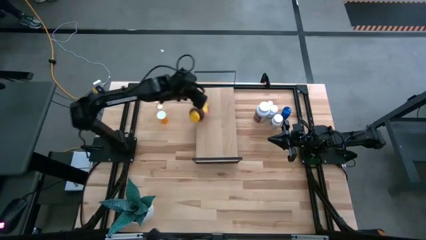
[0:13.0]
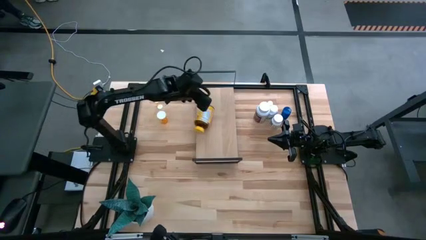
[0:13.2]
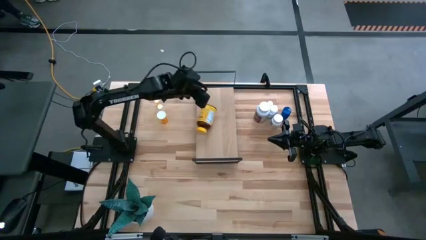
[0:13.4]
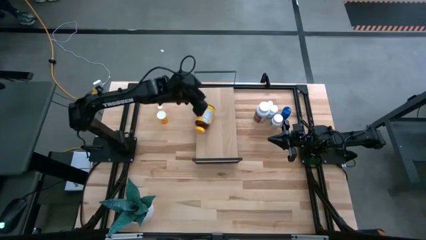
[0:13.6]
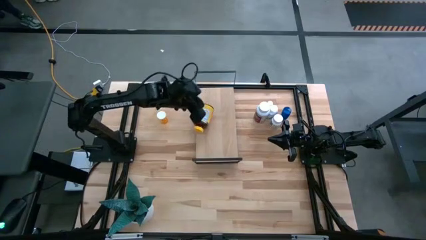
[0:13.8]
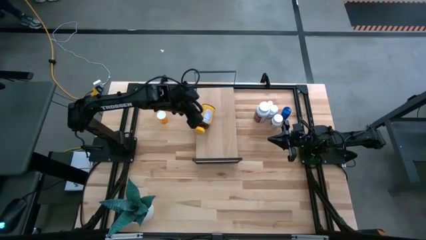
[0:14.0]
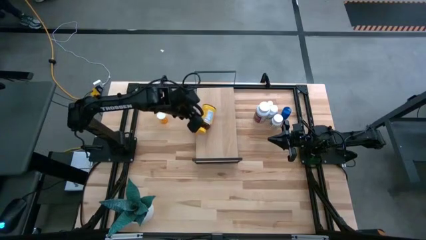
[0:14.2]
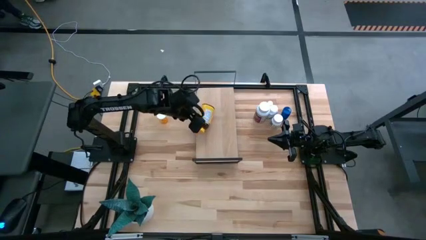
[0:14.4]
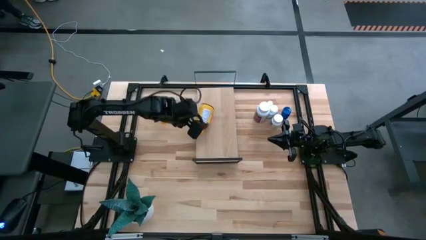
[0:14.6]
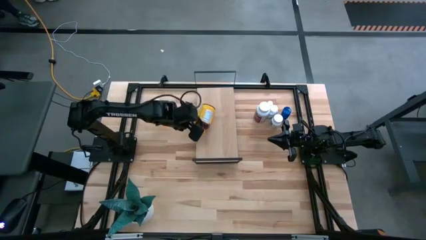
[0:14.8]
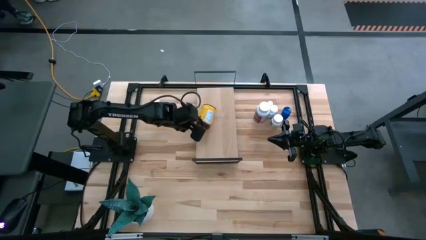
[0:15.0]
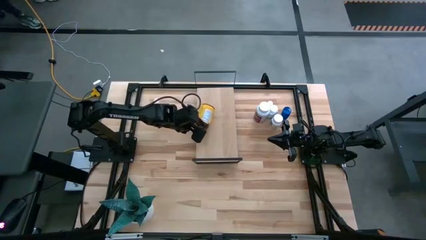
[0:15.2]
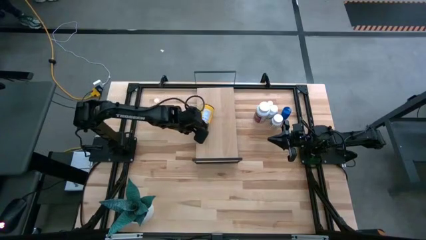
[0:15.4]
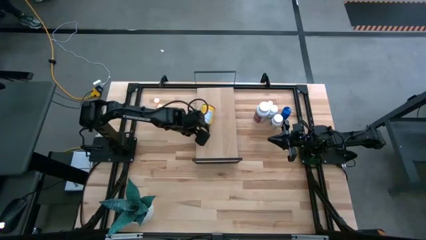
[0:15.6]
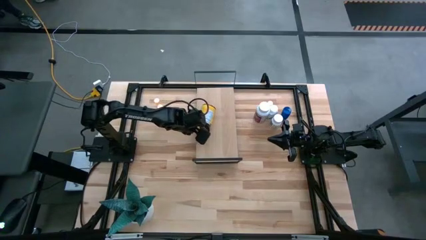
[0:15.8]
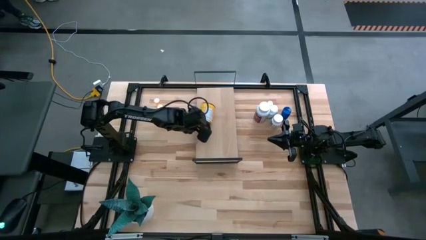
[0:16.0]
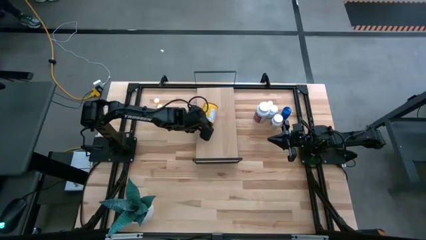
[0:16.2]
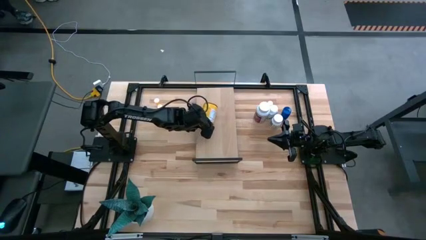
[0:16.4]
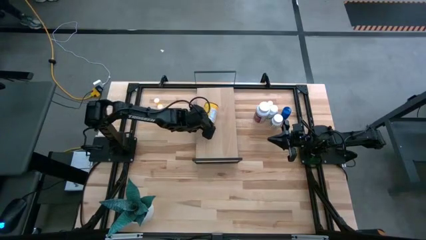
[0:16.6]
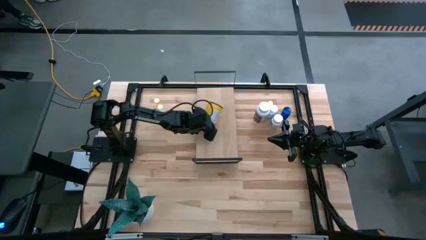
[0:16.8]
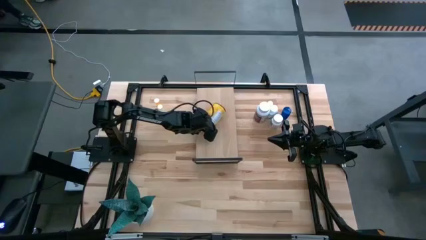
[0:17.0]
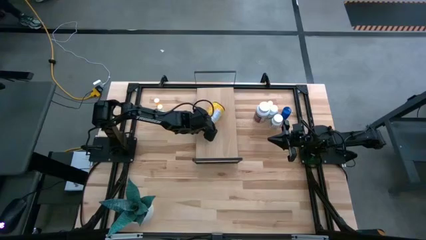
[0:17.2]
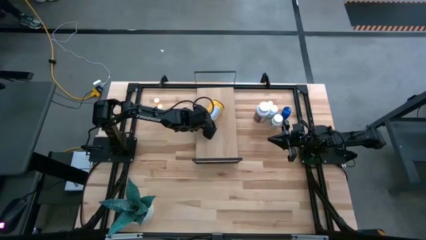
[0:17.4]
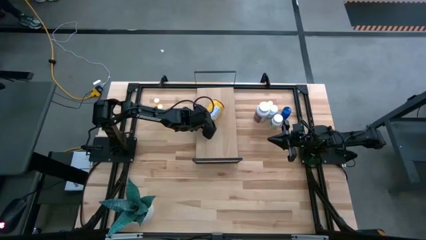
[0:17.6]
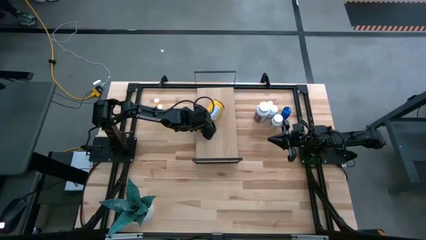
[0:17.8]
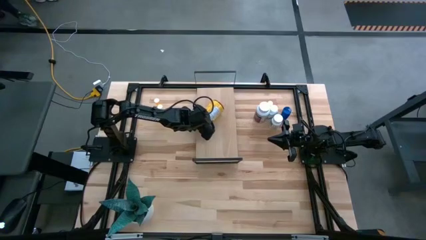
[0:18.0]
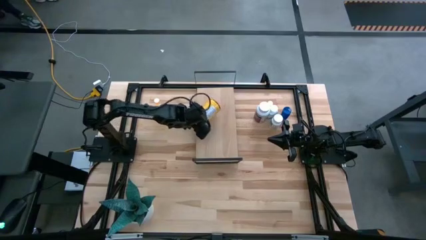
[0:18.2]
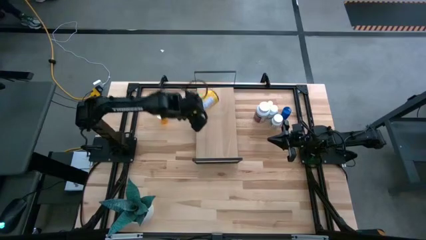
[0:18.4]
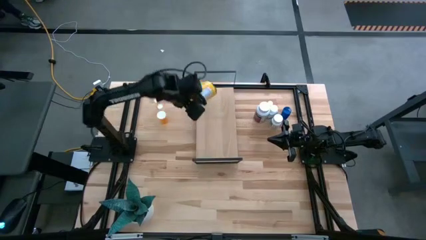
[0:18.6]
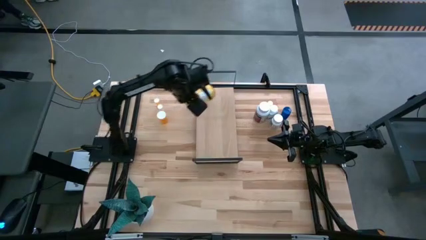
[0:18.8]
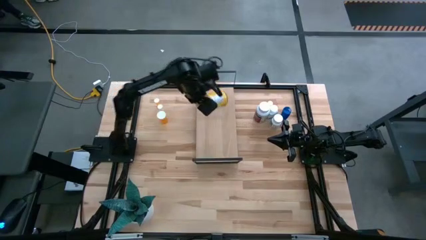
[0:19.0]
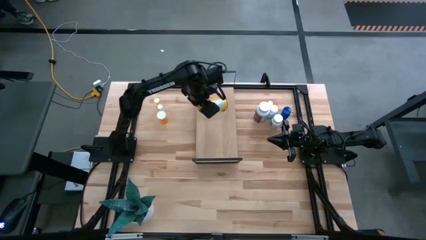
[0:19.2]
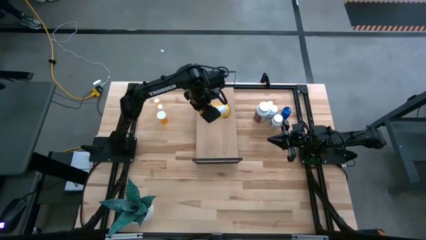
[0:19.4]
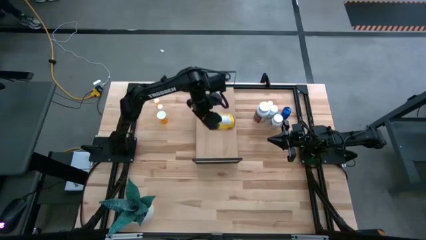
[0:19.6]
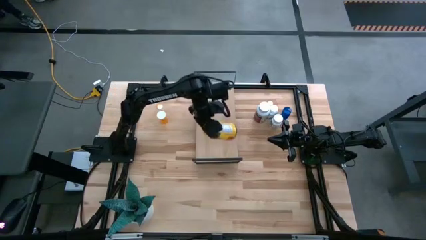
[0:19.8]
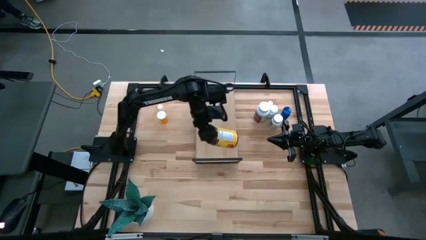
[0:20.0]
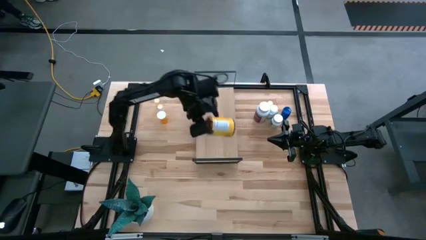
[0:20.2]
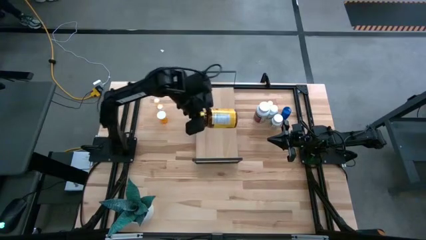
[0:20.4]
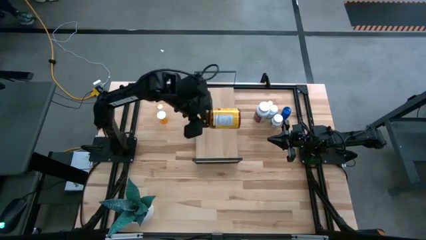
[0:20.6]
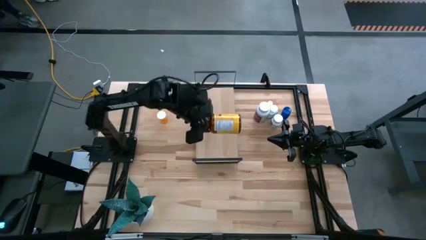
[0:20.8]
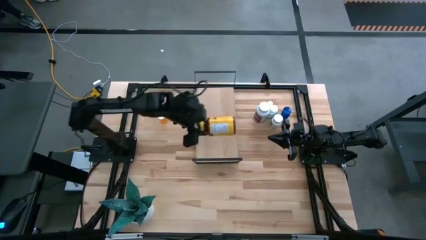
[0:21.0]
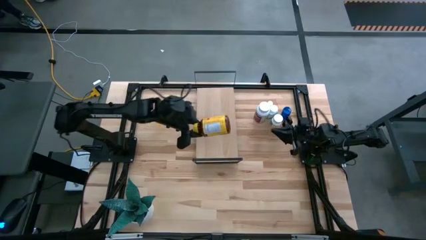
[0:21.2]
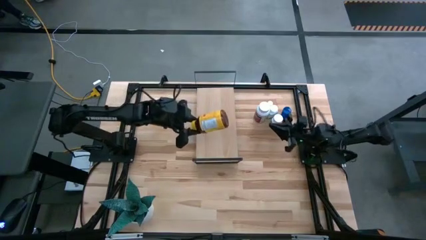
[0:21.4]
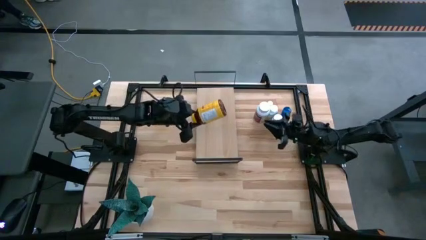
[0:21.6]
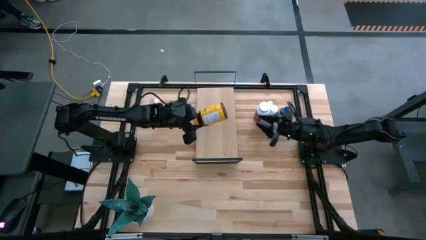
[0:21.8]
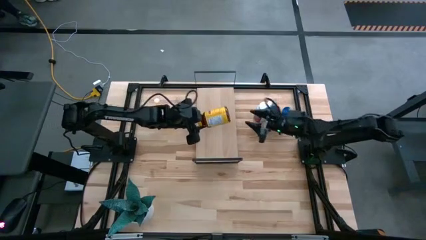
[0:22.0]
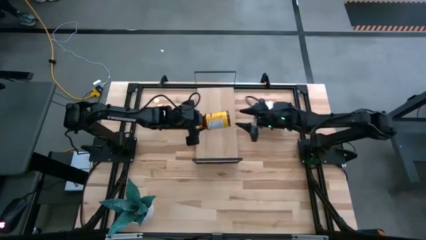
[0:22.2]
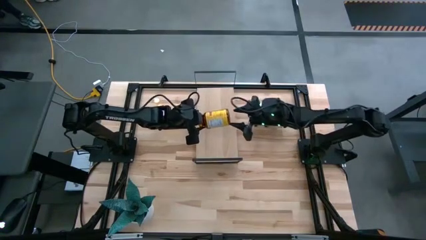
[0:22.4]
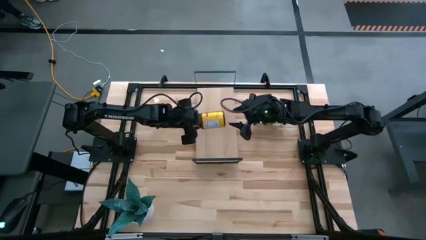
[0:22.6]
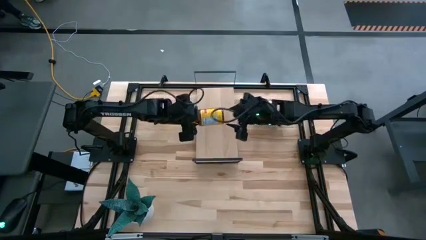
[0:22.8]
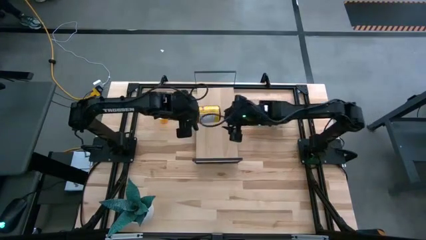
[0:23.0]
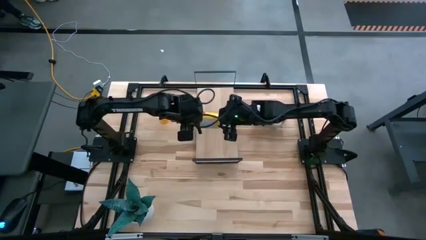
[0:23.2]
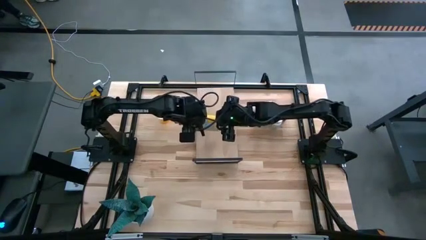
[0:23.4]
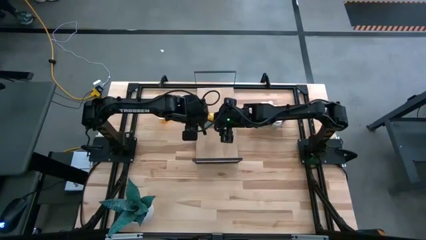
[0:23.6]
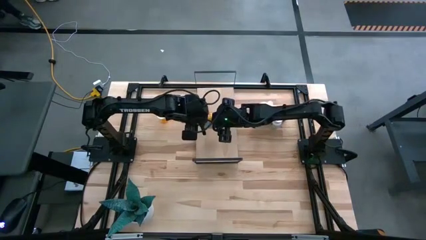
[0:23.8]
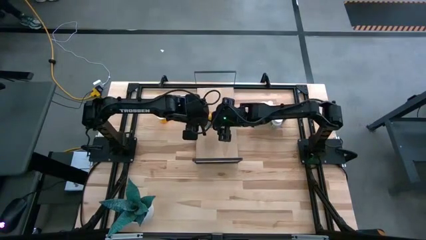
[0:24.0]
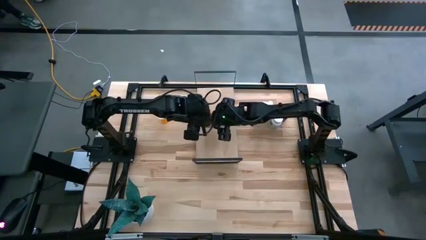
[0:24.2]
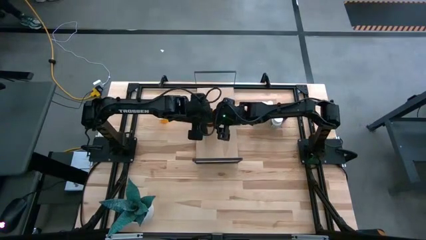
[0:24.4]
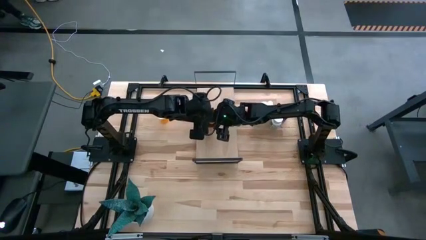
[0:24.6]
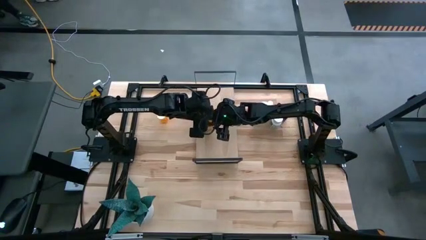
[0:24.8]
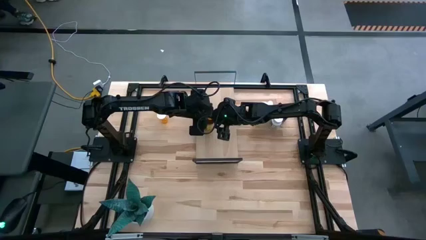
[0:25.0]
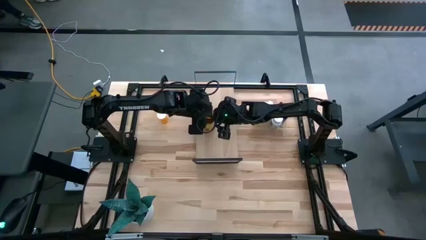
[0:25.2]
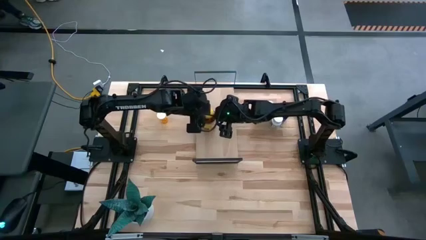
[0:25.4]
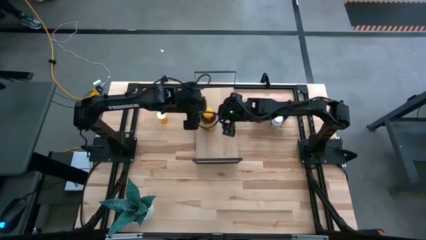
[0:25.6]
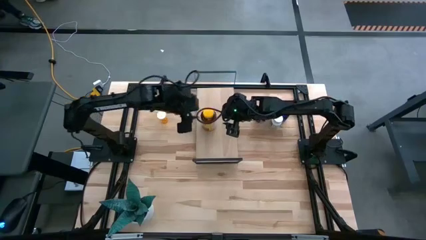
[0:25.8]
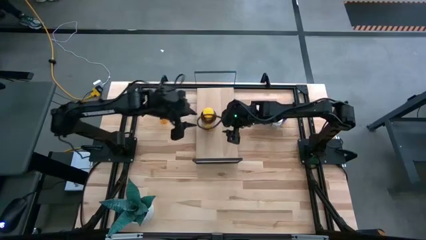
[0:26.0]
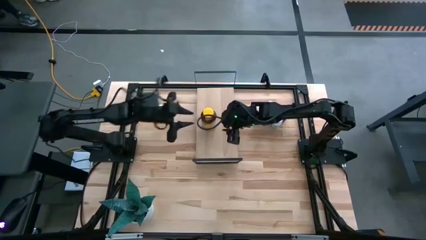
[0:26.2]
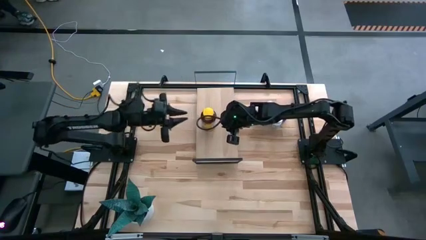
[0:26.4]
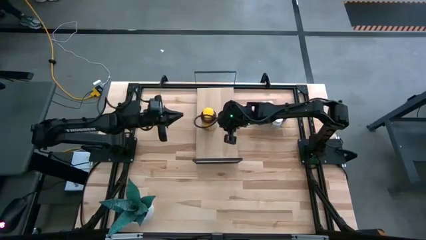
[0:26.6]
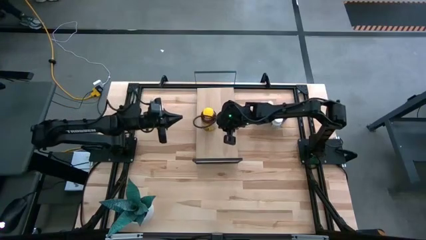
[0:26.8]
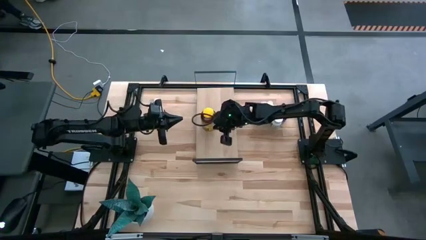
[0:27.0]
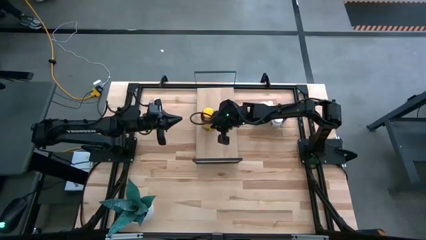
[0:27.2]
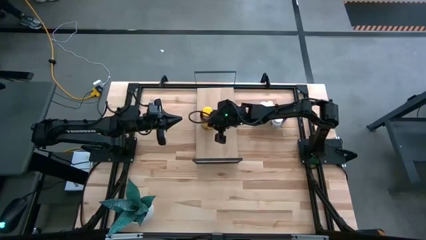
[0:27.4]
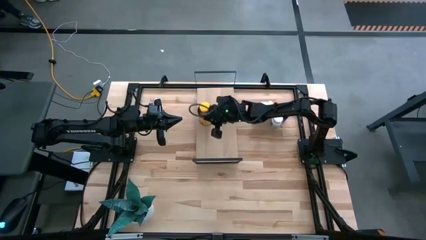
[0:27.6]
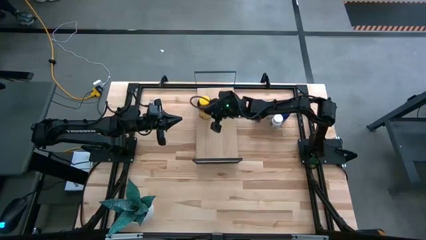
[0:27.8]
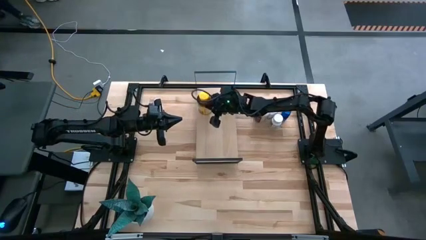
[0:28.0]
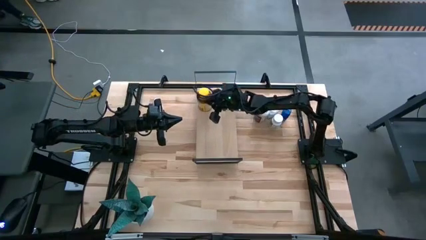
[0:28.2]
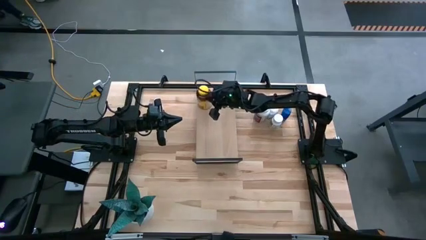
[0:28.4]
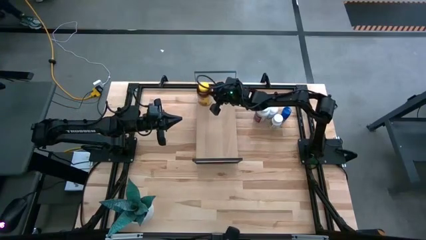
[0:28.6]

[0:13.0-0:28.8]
Task: Pick and place medicine bottles onto shelf by color
Put the big yellow medicine bottle on the shelf
